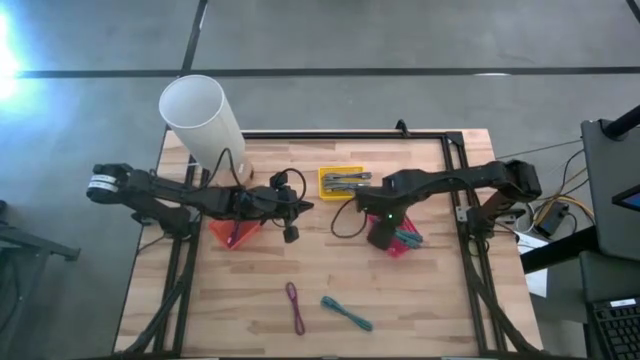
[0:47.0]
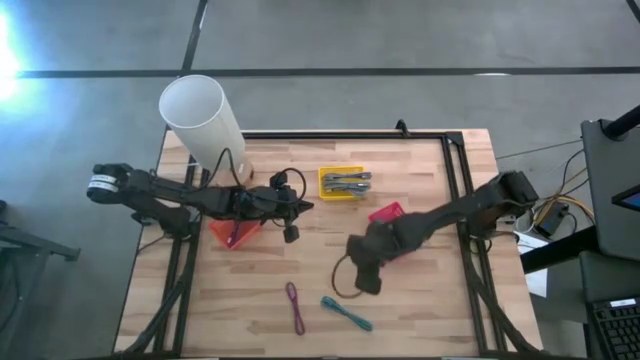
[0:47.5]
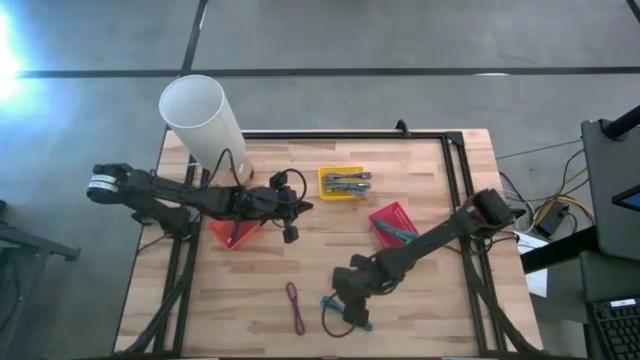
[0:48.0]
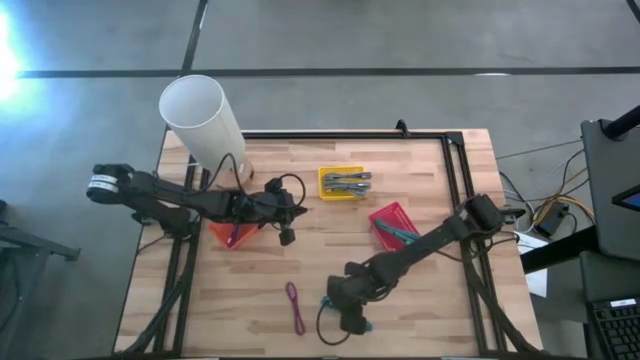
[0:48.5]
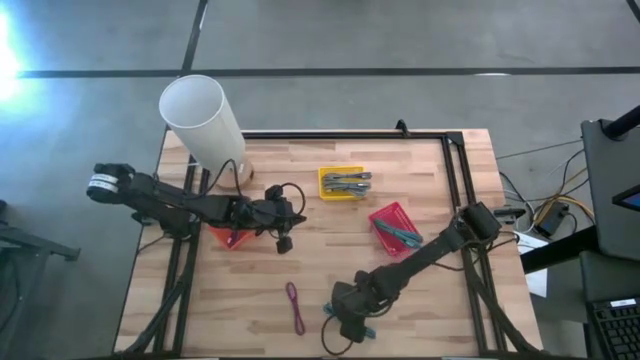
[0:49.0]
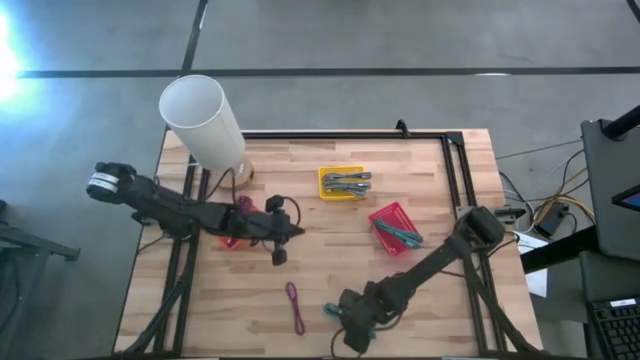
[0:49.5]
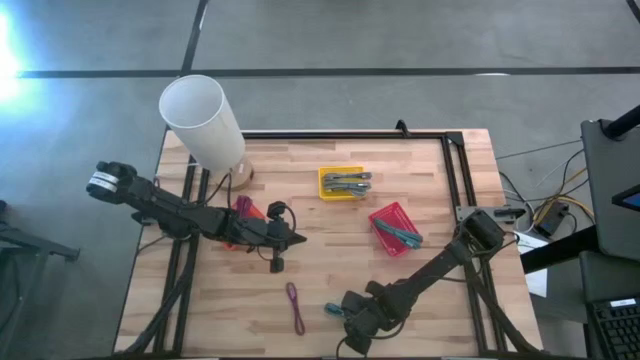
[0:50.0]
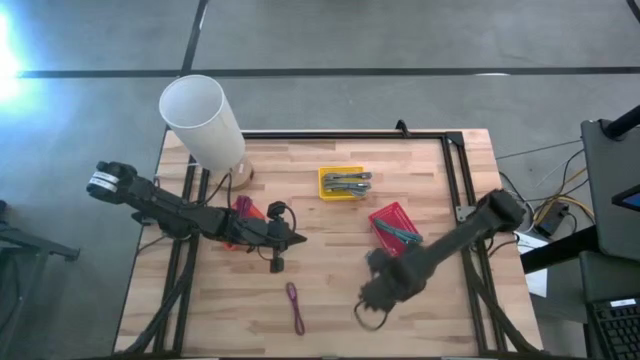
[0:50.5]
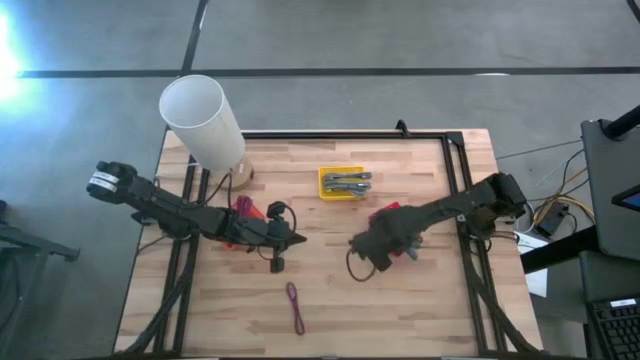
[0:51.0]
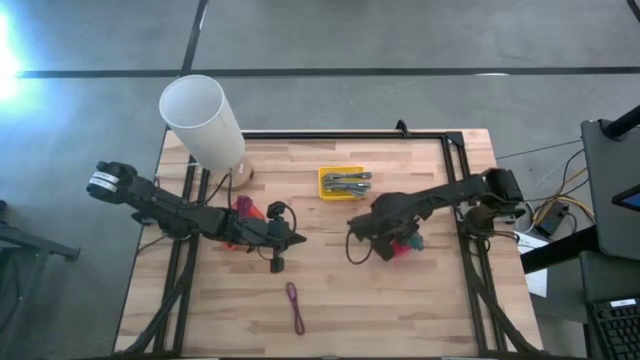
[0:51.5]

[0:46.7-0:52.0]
Task: Pick & Place USB Port
Put the blue patterned charger cable into the red bin

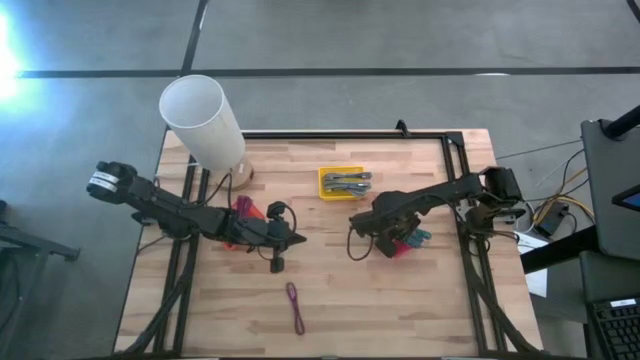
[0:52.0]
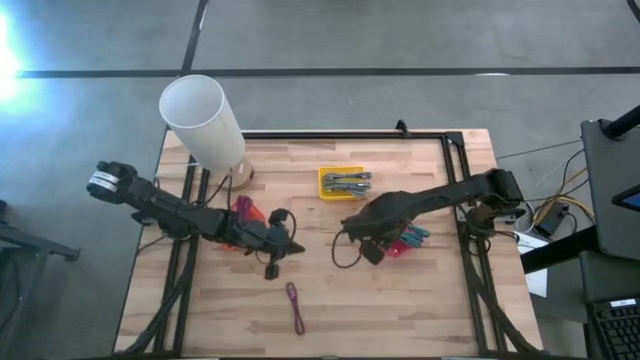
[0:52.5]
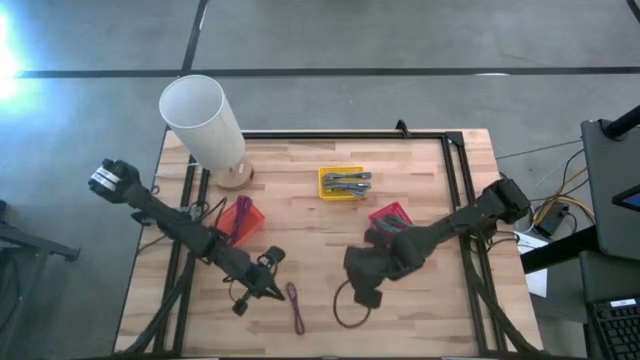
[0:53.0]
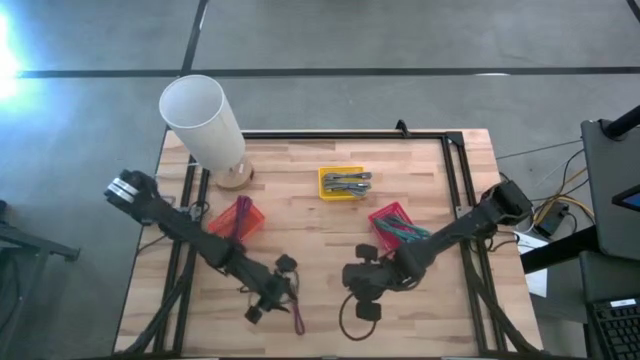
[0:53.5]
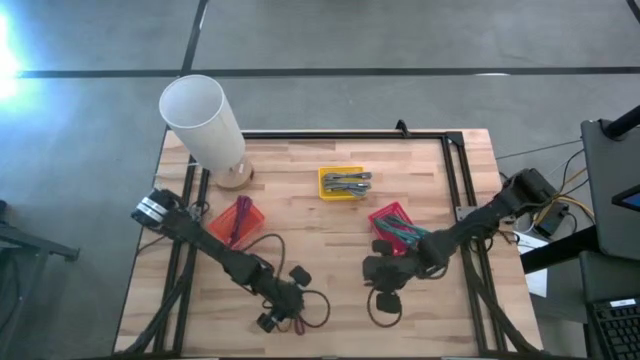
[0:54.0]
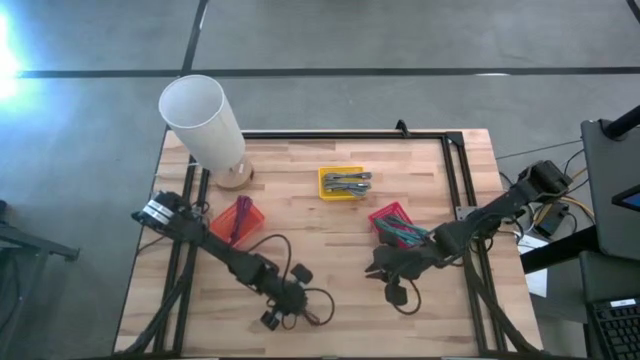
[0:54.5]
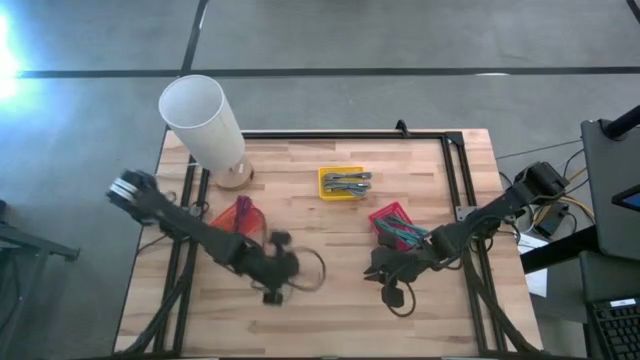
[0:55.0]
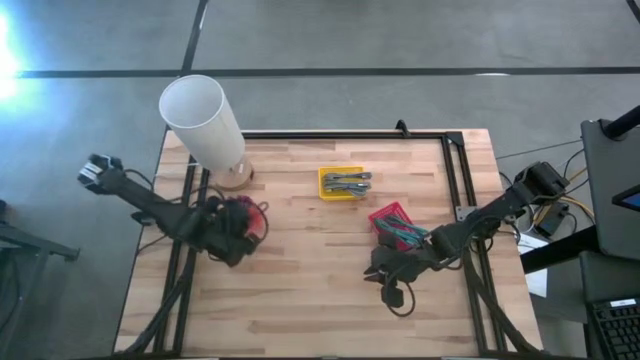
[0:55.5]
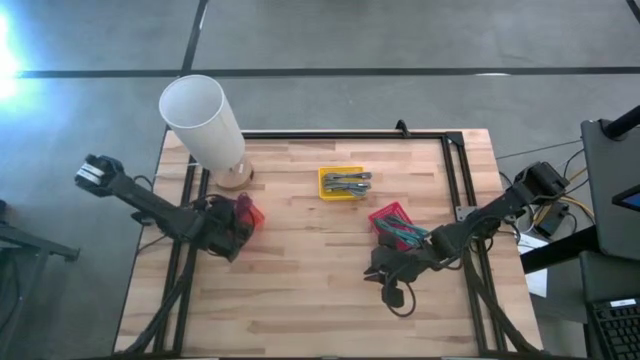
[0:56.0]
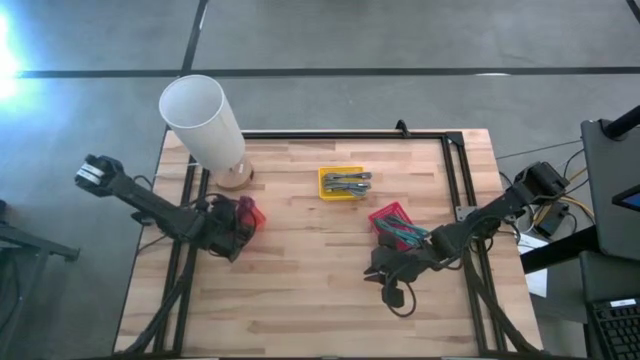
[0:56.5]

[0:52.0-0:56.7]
Put the pink patterned charger cable into the orange bin

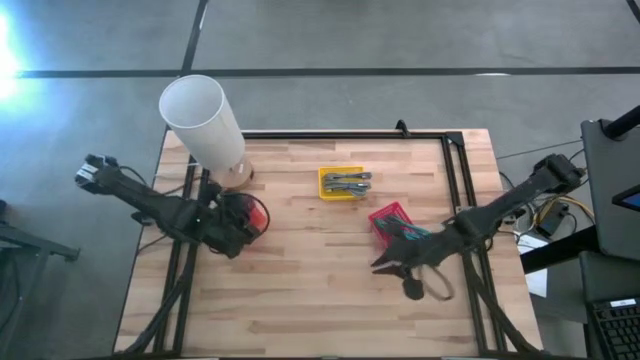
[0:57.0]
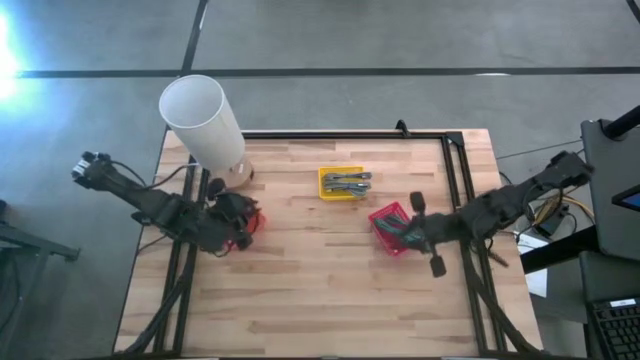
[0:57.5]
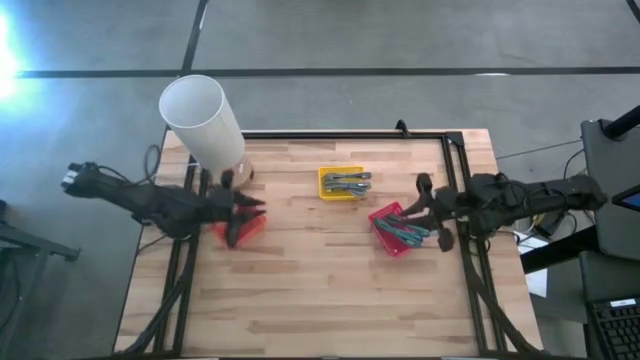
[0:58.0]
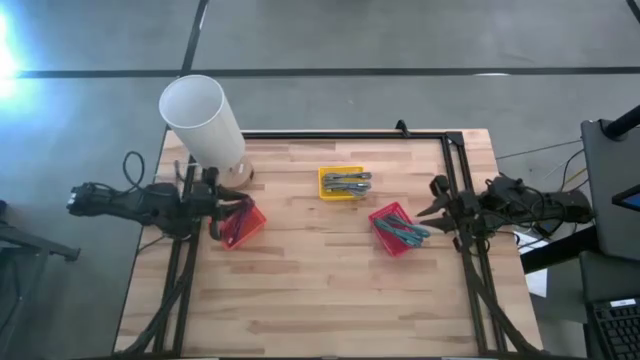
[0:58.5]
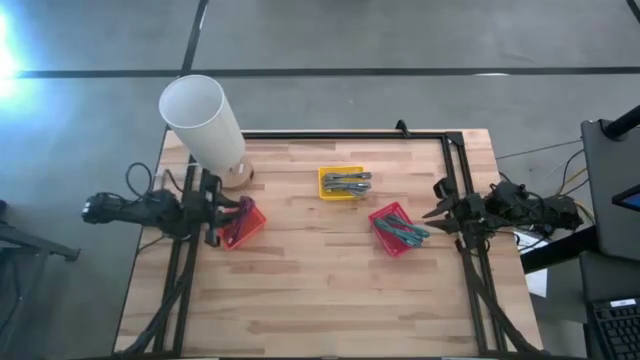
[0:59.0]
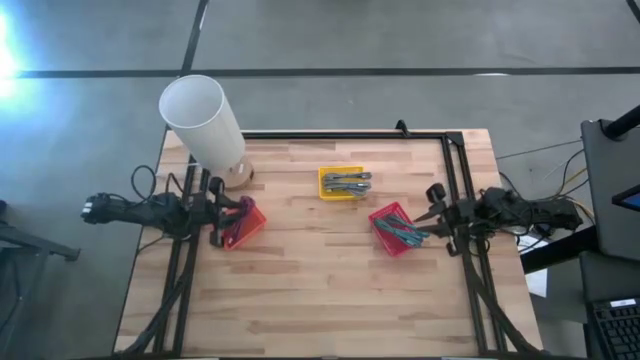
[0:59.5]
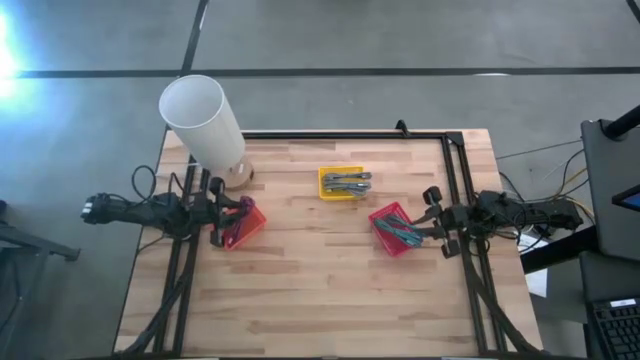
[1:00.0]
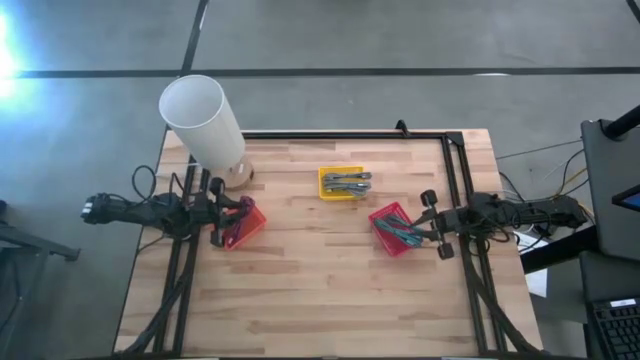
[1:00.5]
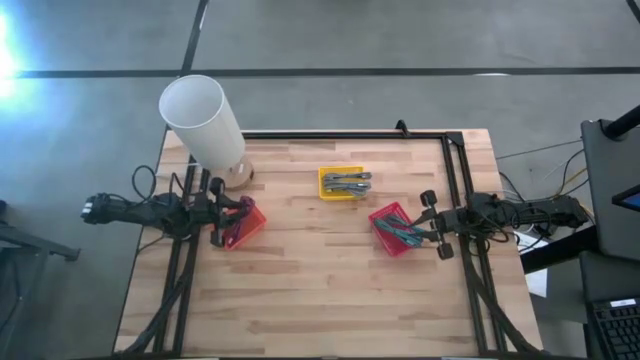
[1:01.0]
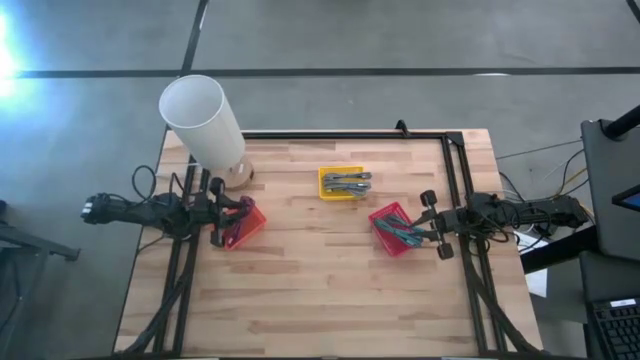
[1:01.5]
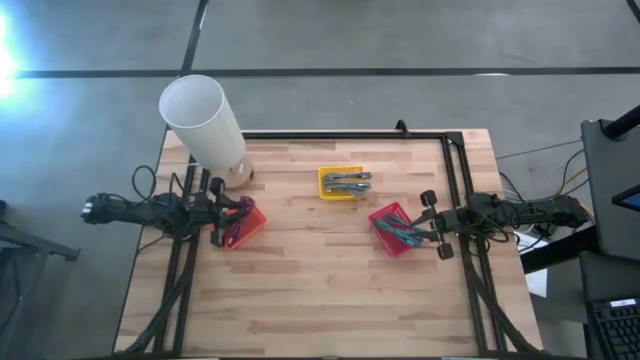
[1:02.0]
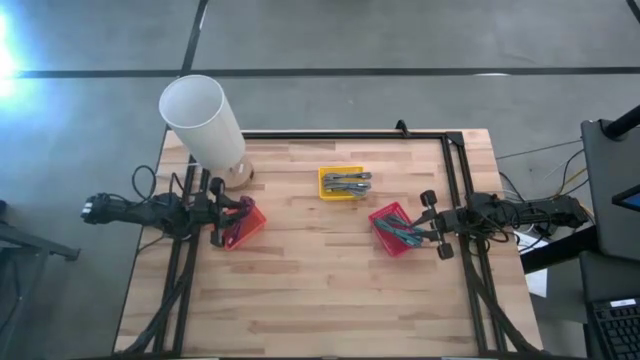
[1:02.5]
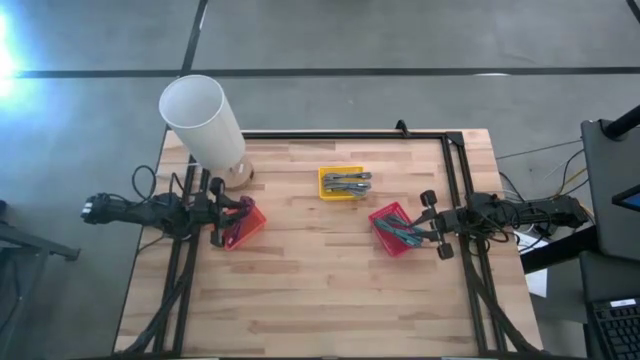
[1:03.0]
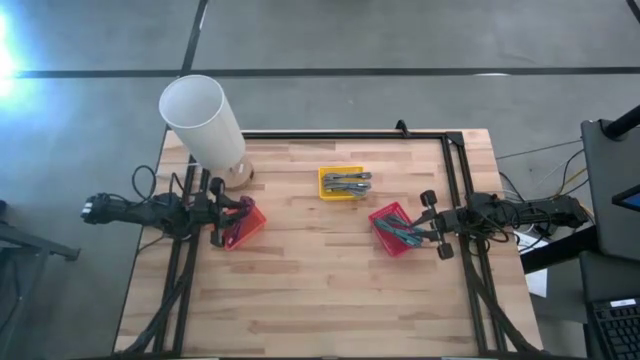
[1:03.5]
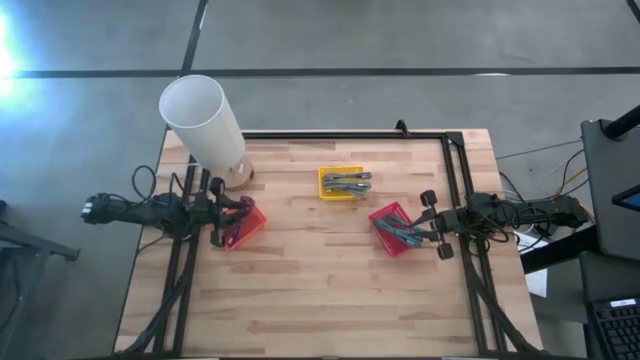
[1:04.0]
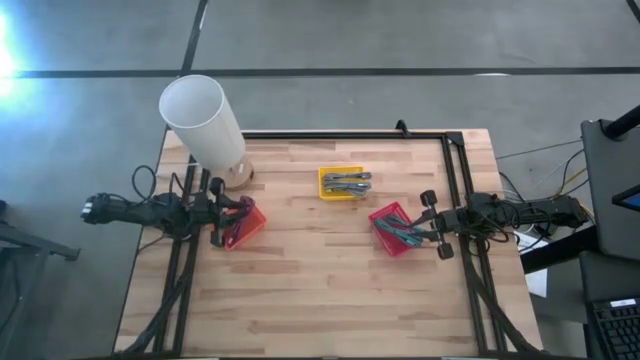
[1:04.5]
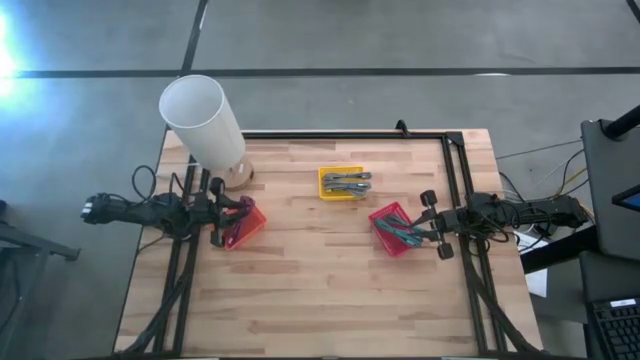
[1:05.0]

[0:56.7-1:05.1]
Return to Home Position

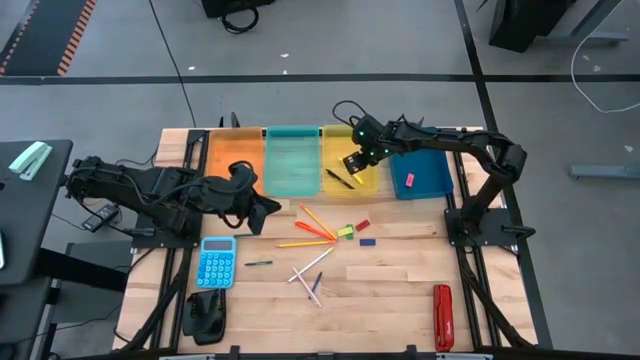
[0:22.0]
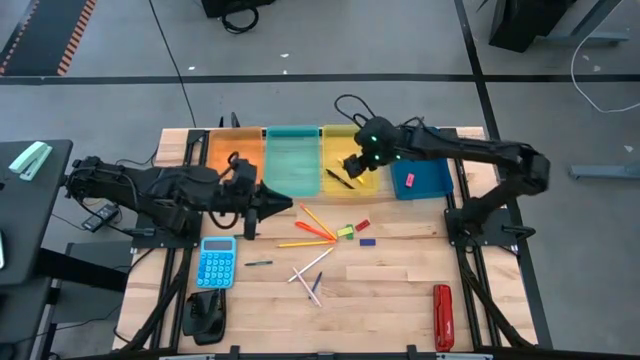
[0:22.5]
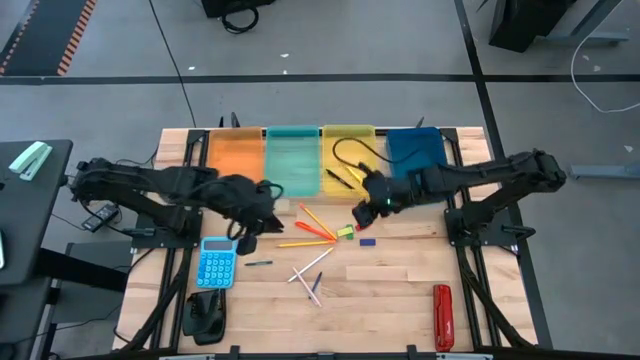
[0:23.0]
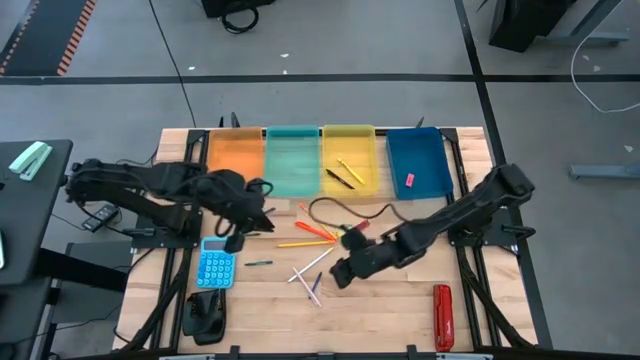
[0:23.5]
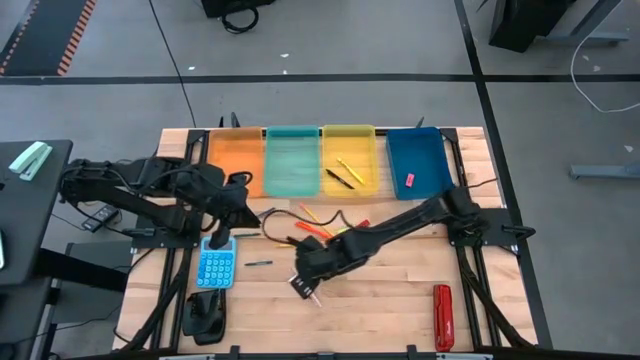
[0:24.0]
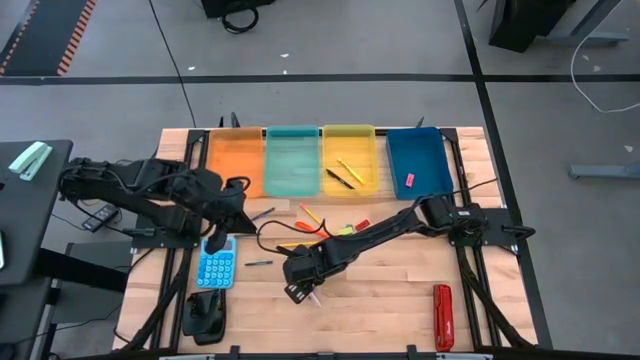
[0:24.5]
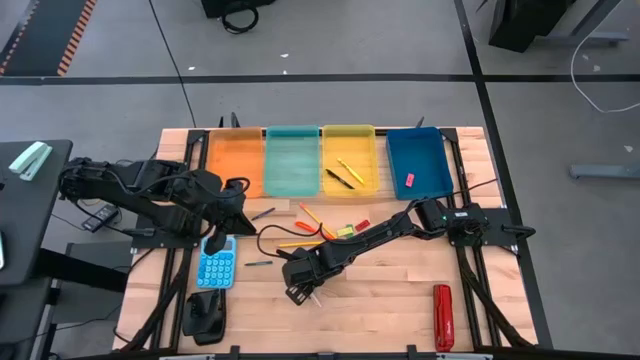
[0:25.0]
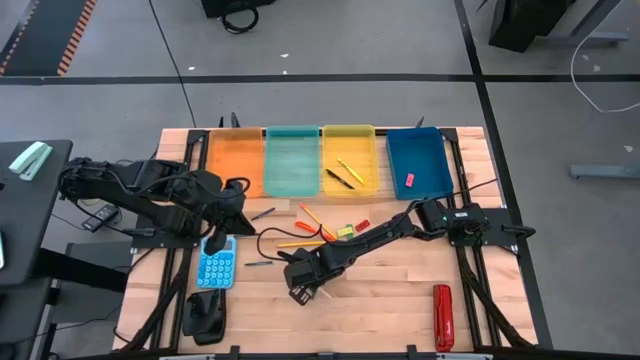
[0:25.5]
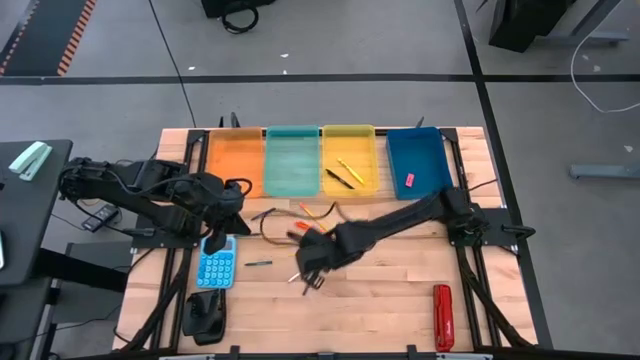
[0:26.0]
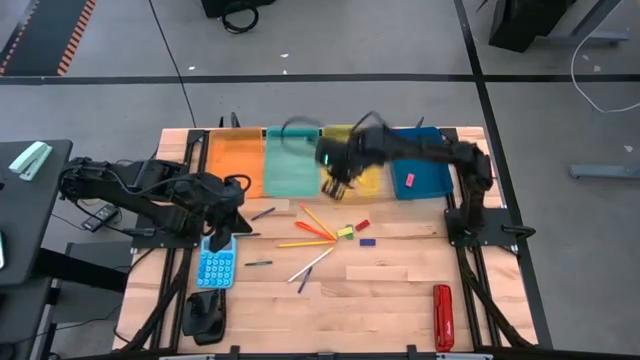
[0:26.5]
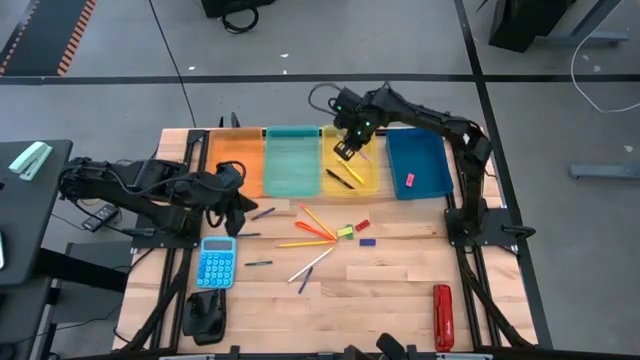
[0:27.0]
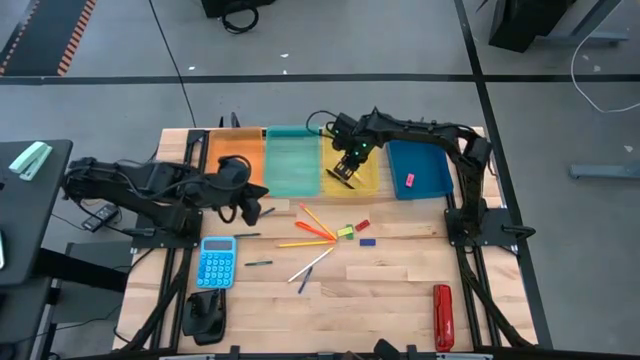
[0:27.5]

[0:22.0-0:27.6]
Task: Sort crayons/erasers/pens/pencils in bins
Put the light brown pen into the yellow bin
